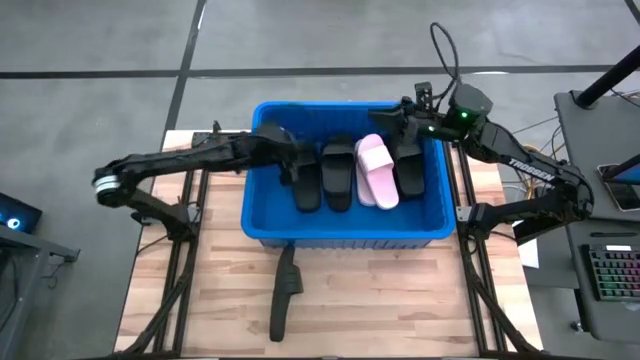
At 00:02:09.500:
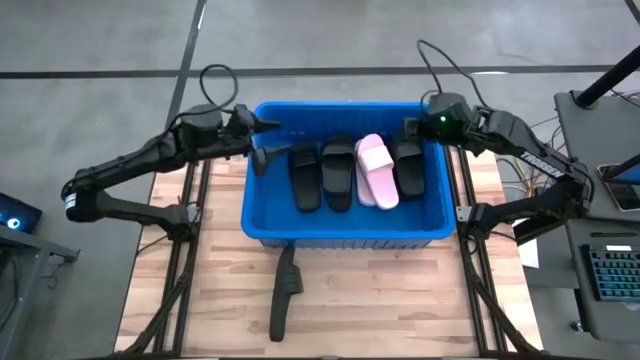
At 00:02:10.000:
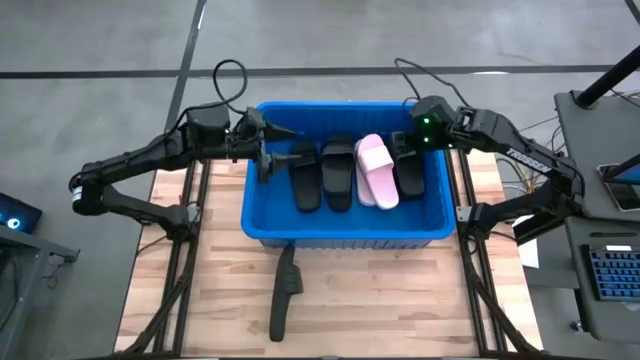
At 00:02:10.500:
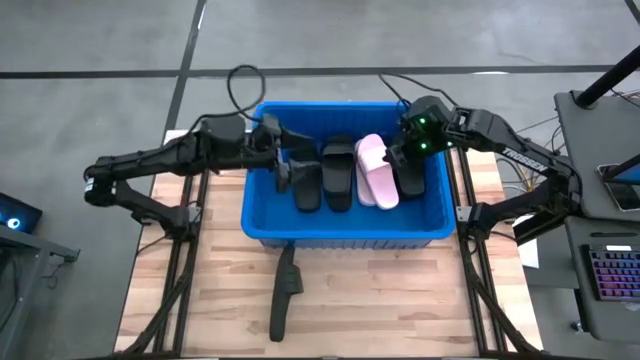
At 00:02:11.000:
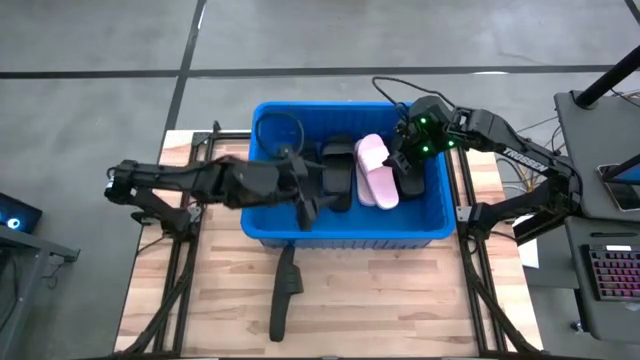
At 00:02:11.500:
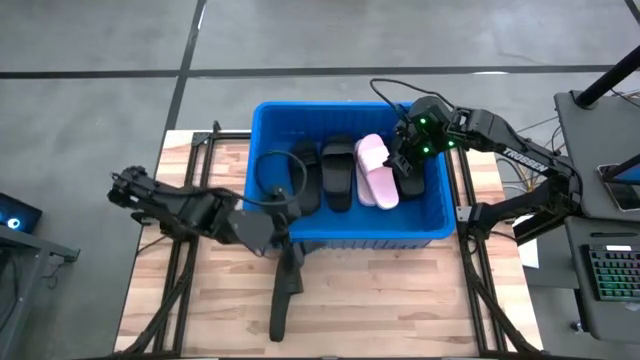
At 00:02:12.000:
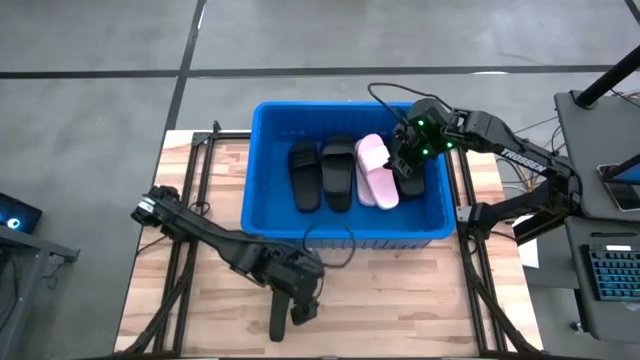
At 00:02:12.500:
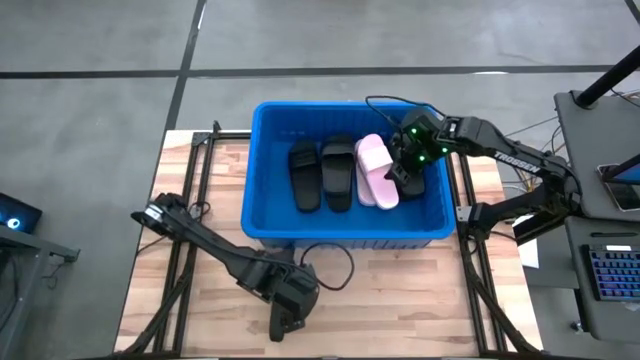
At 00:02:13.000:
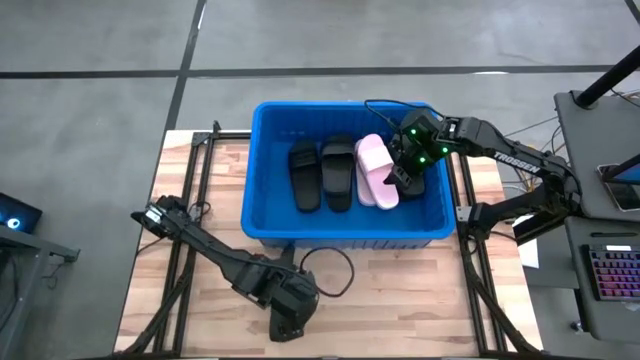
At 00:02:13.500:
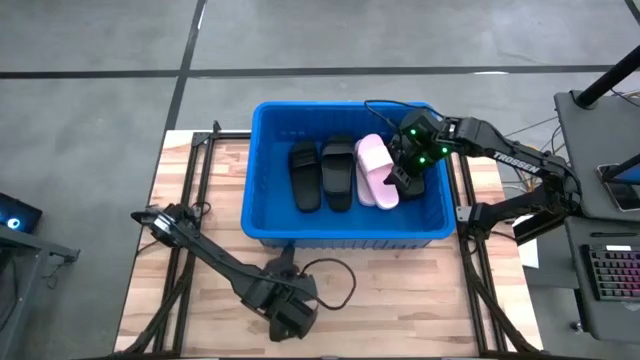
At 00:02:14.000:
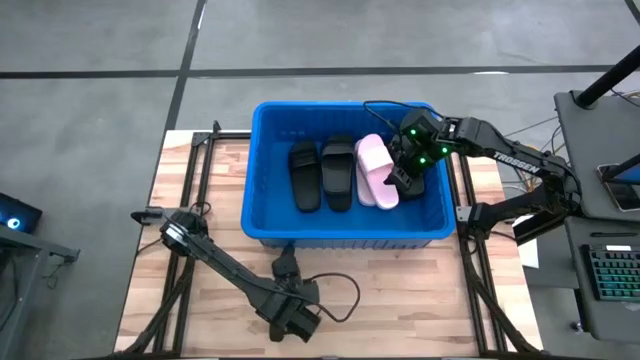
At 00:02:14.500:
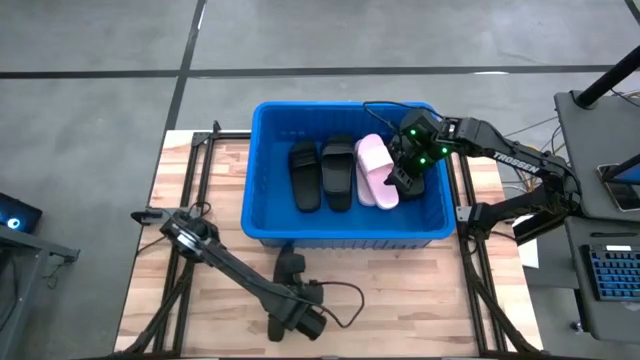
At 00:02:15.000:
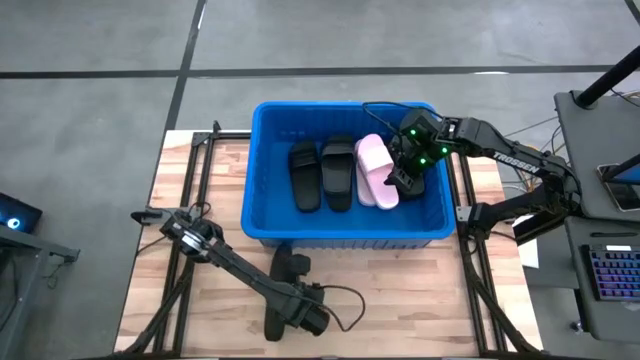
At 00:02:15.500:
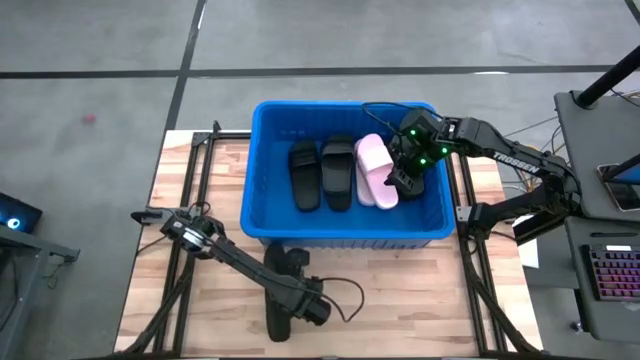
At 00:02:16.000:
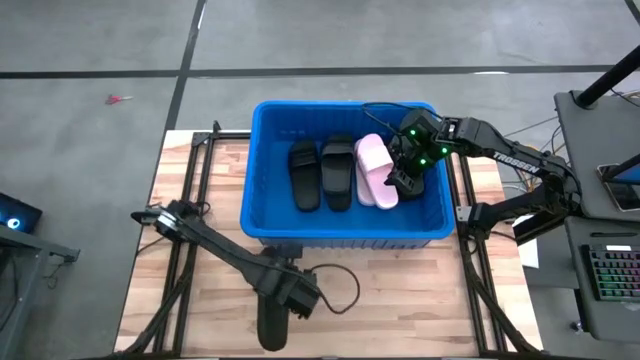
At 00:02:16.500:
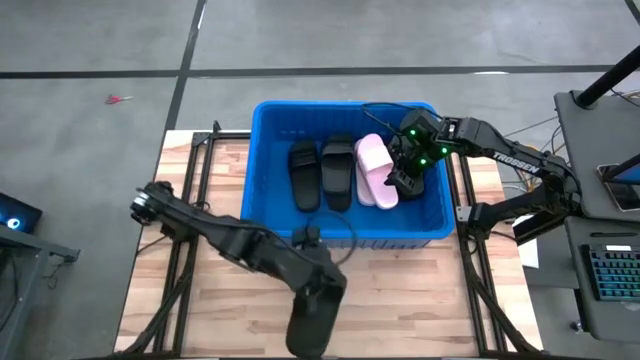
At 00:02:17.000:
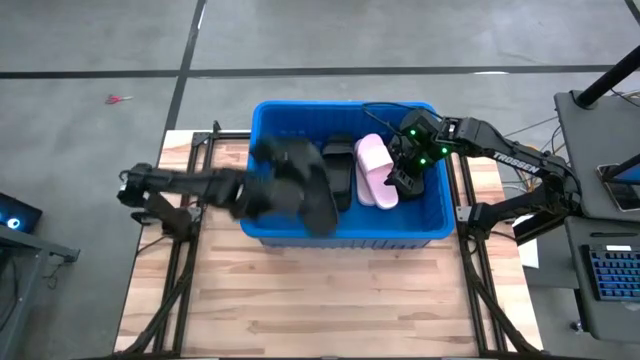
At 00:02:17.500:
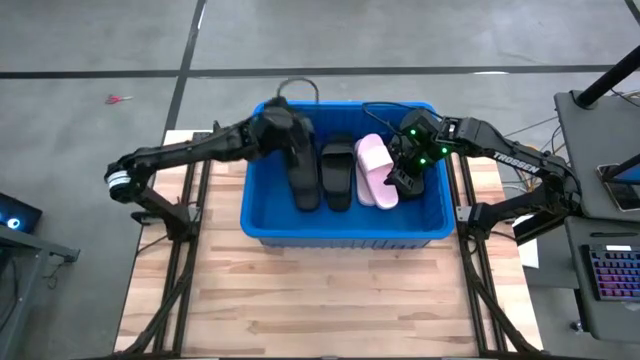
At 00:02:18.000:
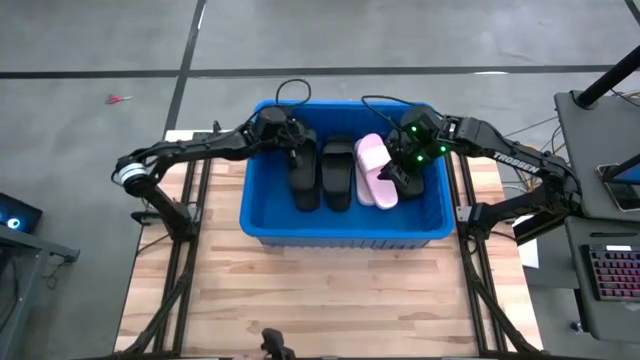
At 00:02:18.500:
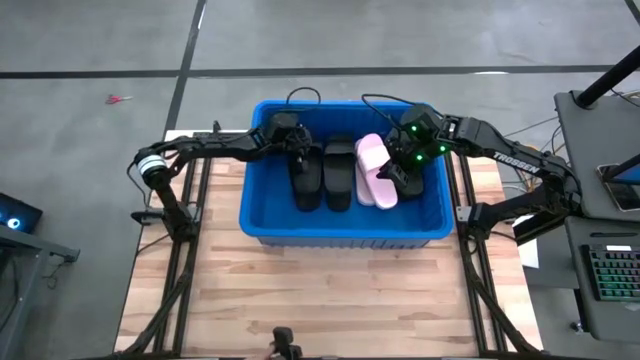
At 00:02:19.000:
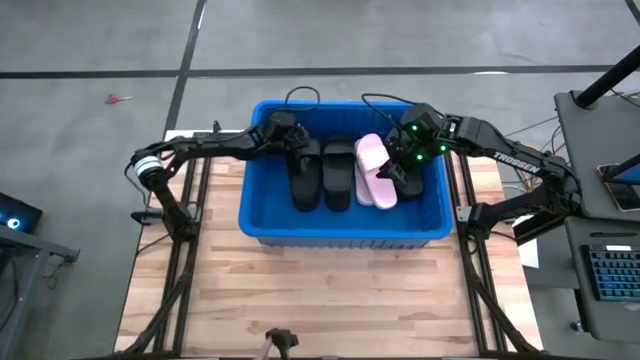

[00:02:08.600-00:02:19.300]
Task: Pick and place slides into bin
Put the black slide into the blue bin

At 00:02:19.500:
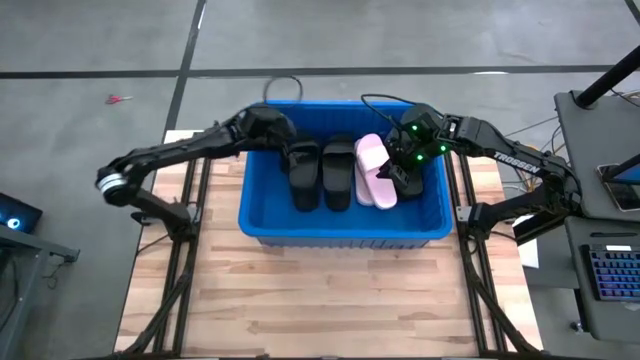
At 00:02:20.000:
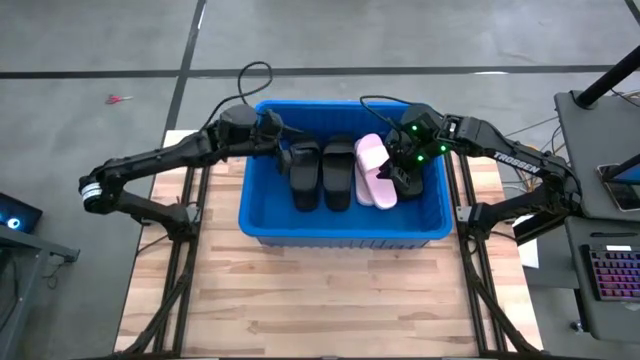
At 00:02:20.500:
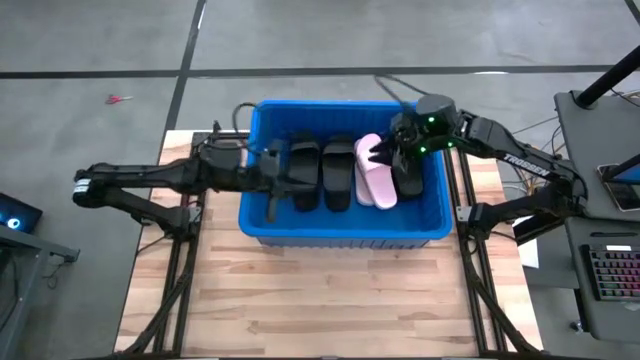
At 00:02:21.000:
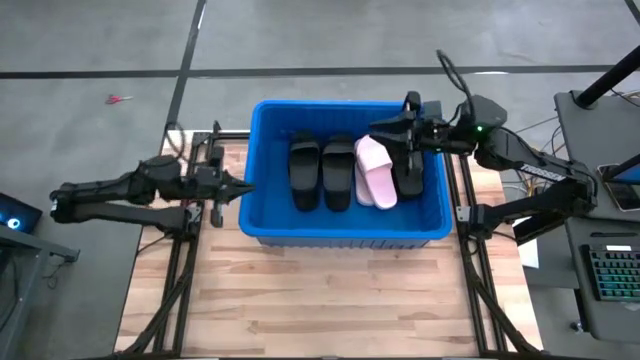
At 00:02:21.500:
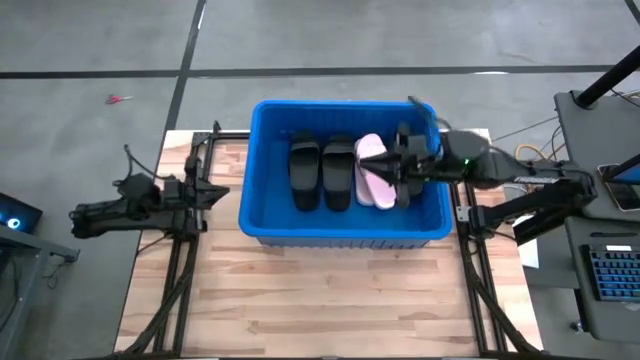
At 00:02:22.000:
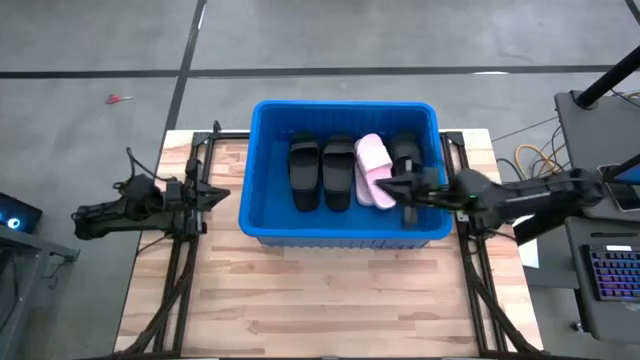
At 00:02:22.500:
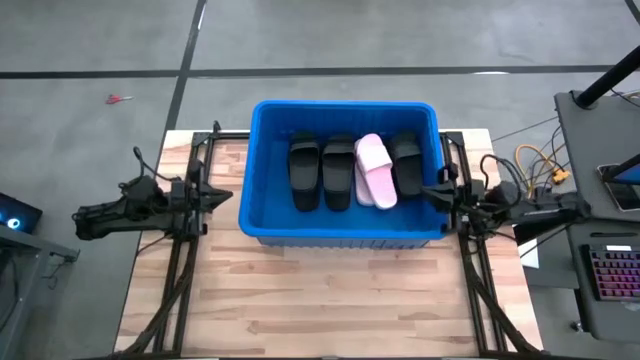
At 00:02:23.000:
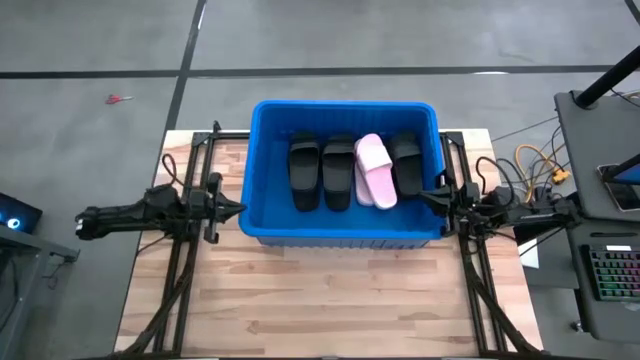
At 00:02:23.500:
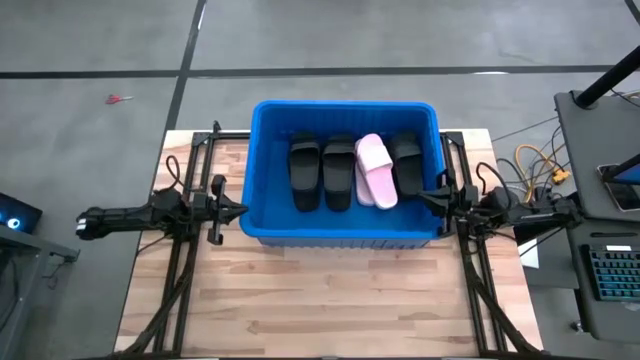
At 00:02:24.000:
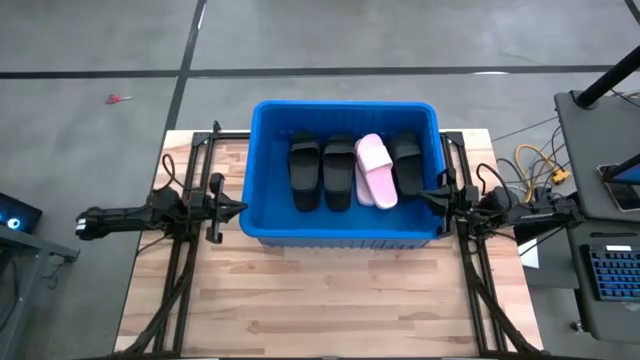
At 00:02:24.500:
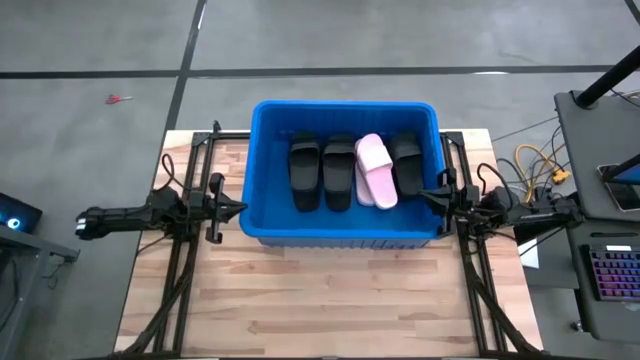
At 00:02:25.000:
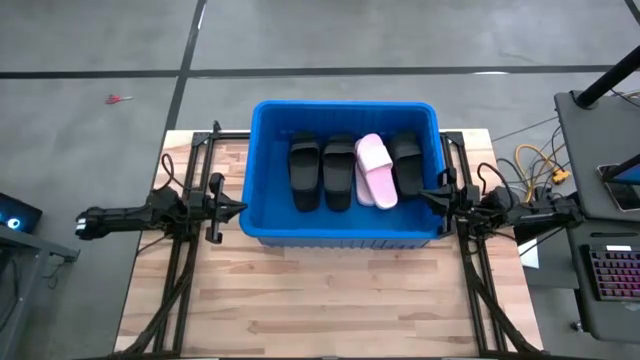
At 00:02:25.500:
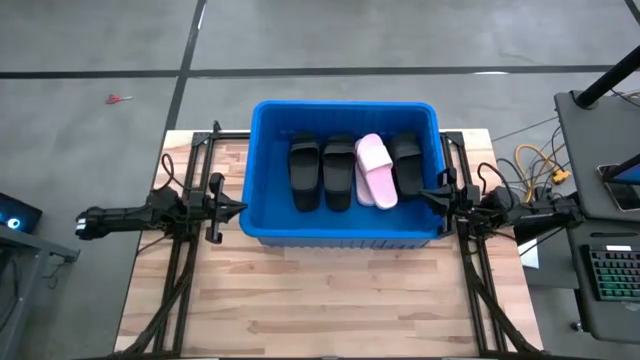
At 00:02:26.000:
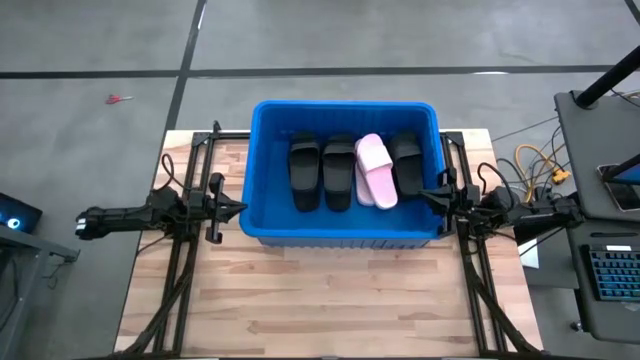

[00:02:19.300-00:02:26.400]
Return to Home Position
